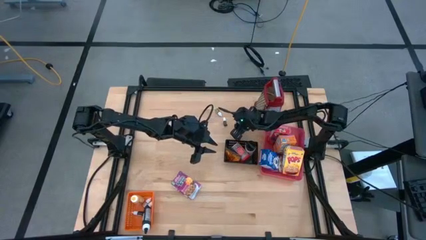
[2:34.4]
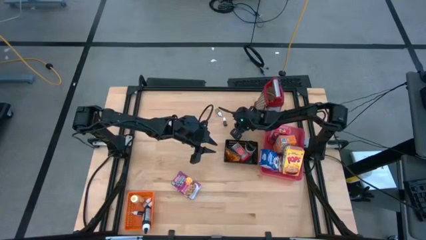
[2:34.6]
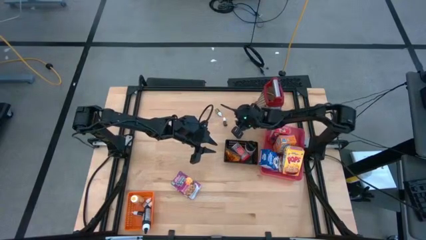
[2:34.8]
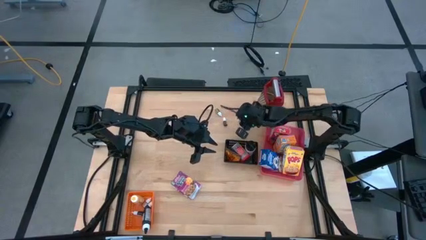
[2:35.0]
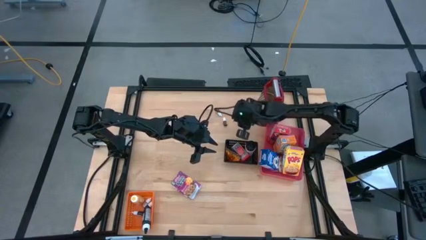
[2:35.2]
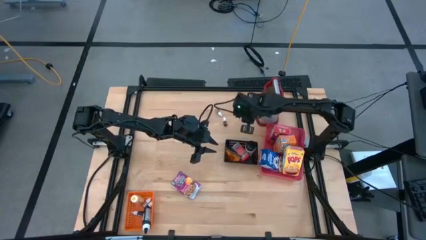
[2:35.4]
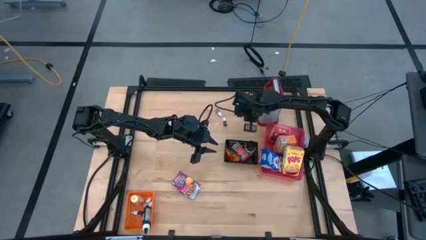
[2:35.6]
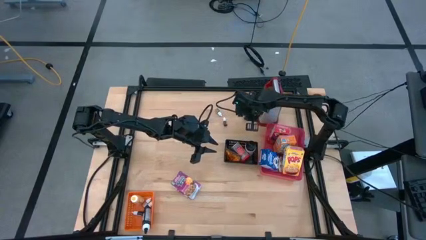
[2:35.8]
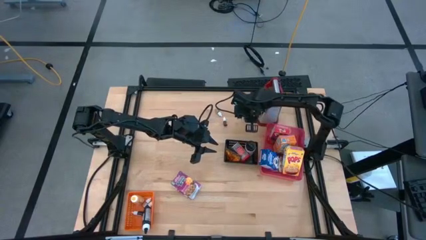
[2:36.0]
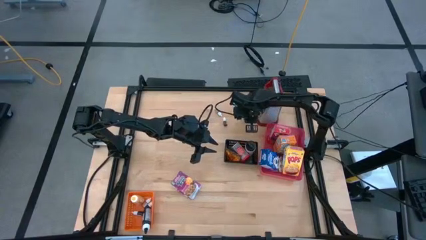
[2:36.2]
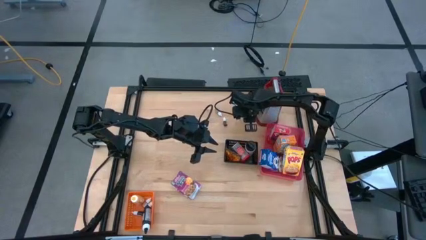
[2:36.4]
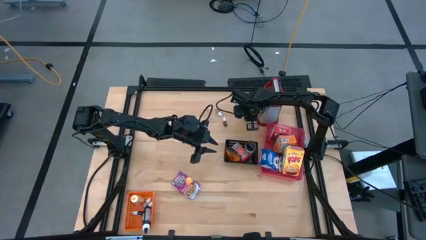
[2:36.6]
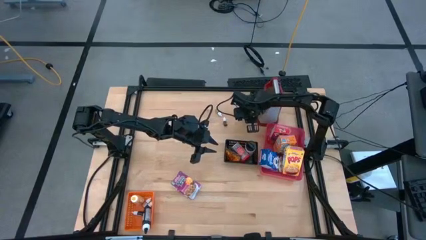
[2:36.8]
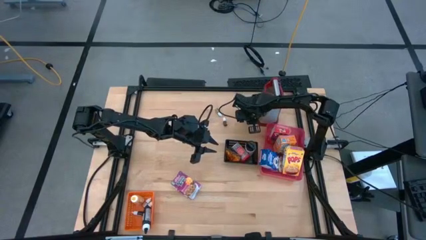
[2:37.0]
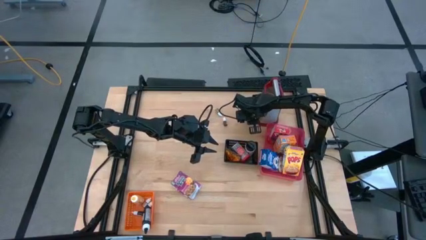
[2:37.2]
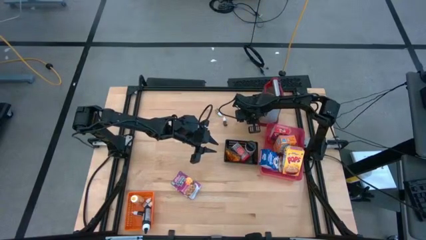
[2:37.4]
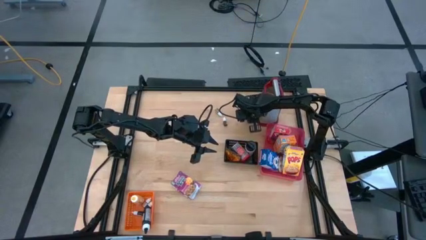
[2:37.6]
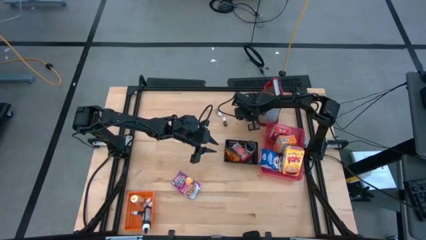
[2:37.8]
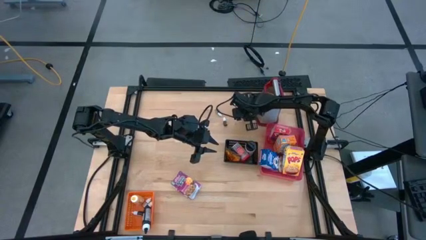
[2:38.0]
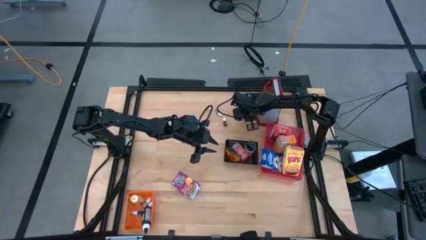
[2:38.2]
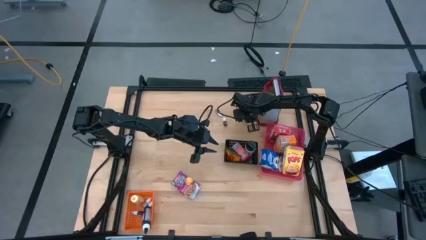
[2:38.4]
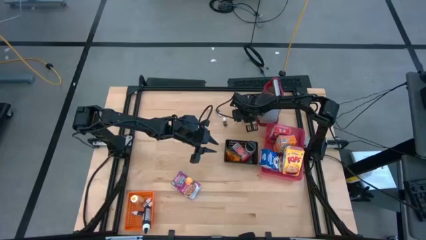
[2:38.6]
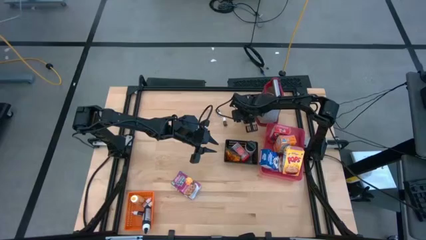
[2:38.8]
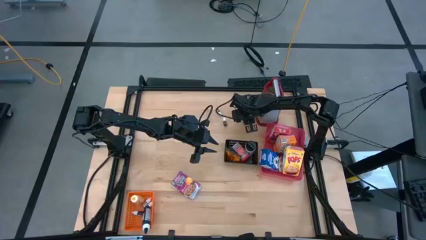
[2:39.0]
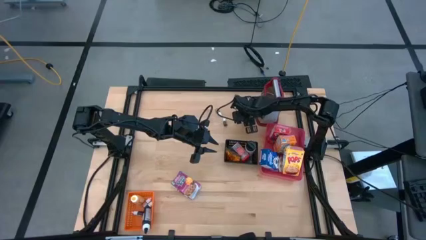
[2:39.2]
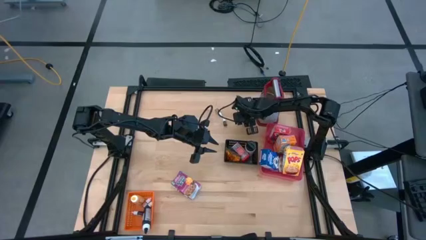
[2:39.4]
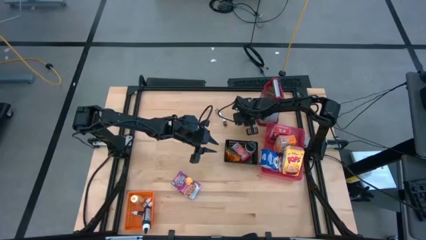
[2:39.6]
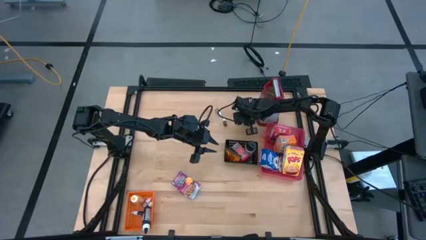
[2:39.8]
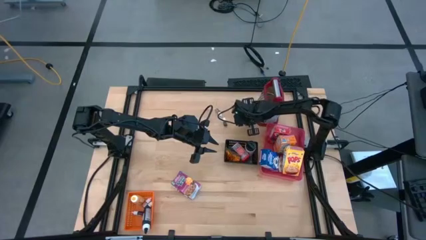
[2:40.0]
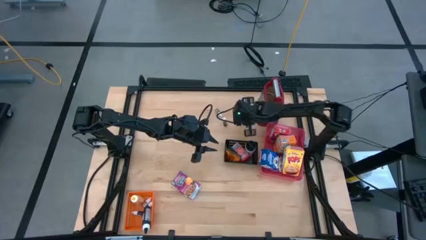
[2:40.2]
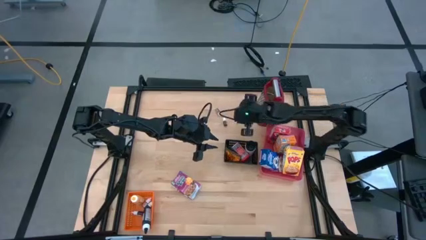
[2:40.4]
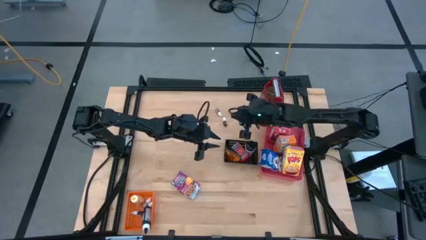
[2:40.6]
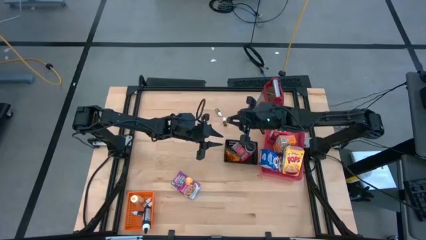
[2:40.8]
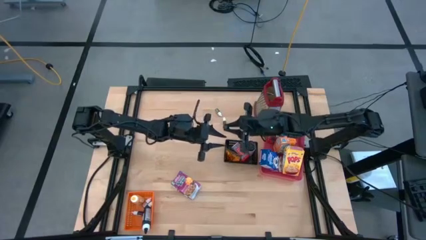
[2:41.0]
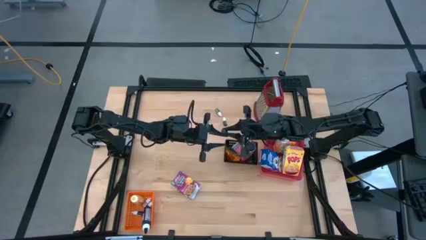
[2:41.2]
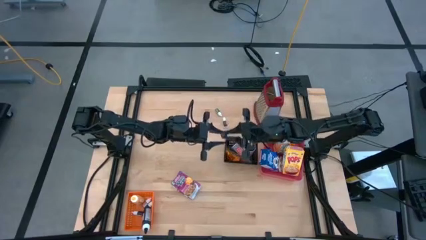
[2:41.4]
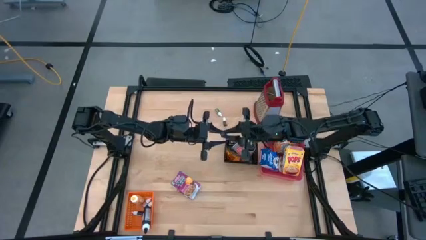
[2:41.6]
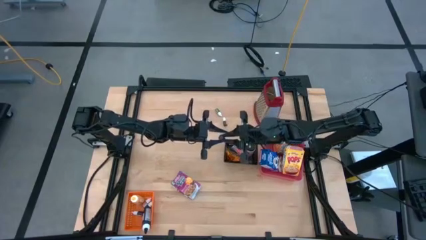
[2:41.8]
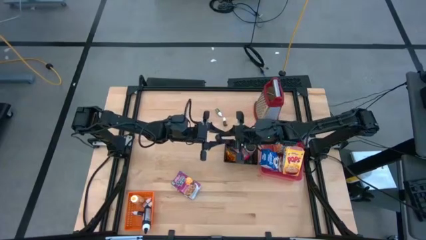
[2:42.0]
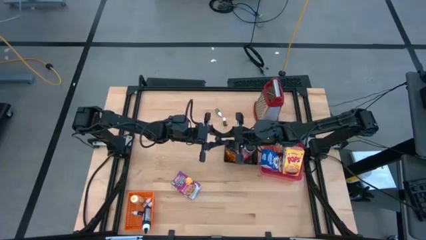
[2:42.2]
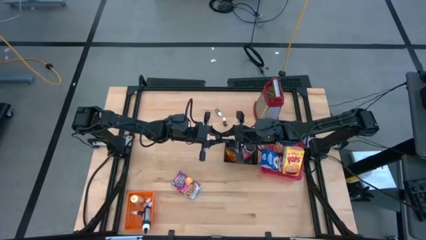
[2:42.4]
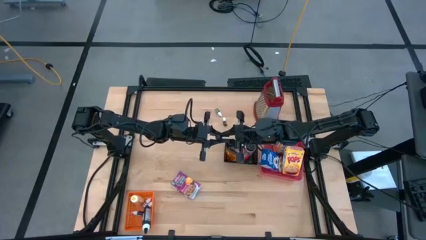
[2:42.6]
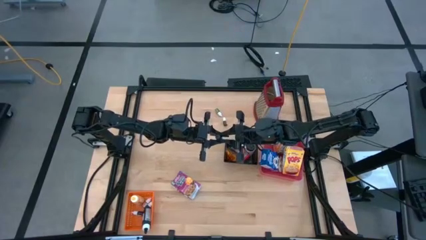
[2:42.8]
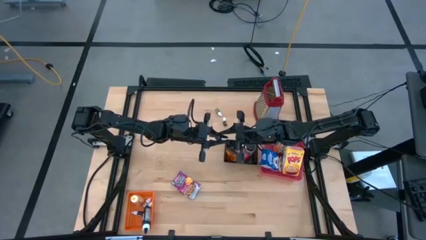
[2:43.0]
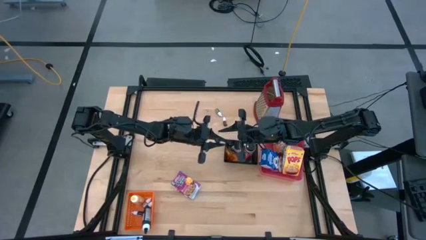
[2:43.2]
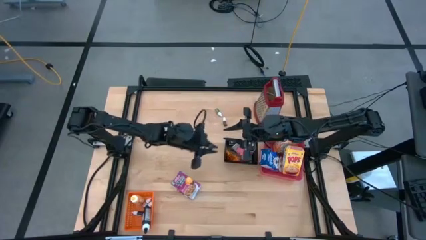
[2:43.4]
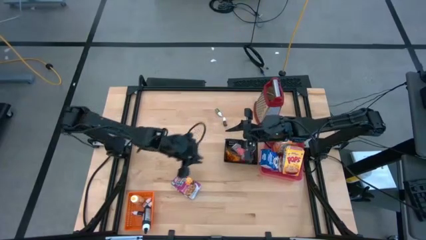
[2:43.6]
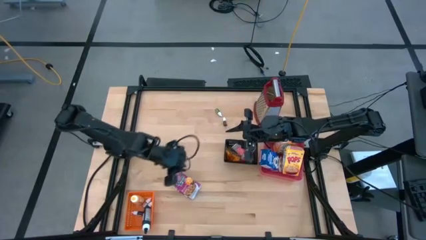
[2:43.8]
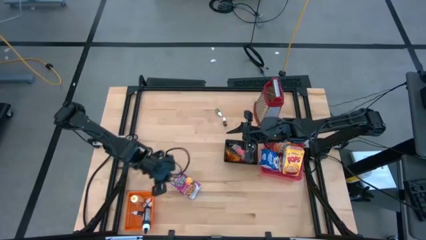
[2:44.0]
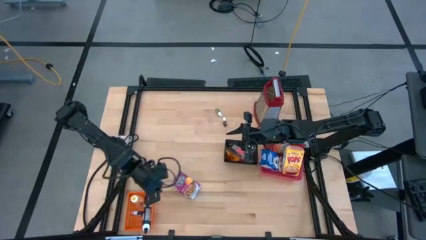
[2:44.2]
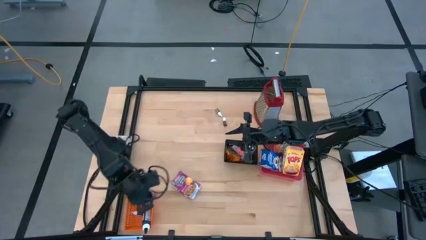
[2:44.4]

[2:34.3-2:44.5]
Task: Pick & Place Kitchen Items
Put the small purple food coloring bottle into the orange bin

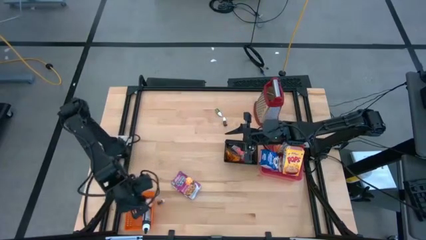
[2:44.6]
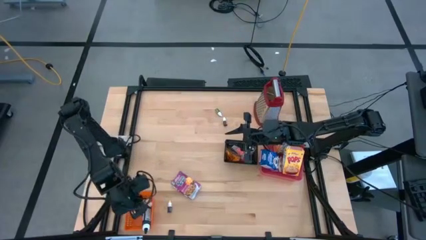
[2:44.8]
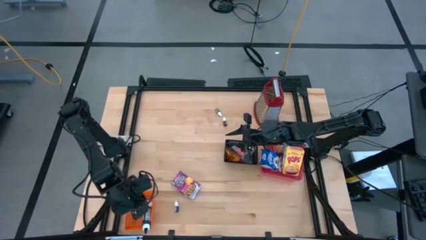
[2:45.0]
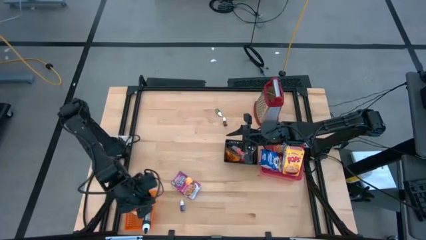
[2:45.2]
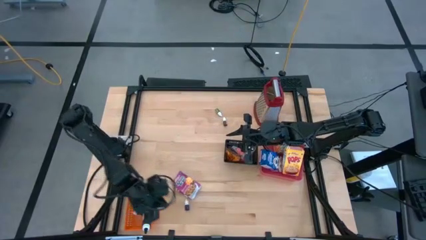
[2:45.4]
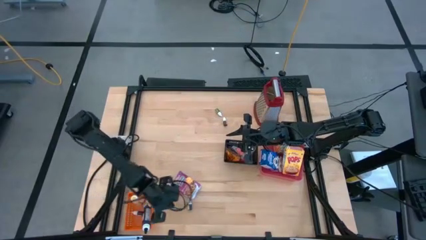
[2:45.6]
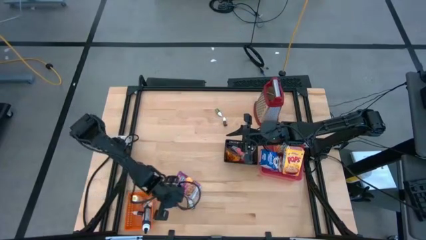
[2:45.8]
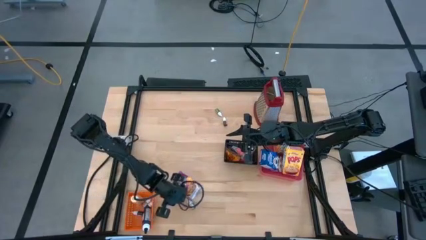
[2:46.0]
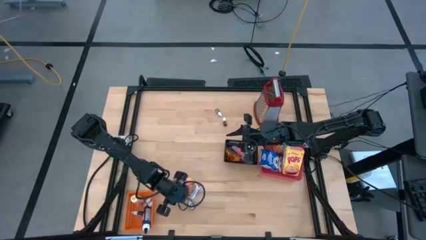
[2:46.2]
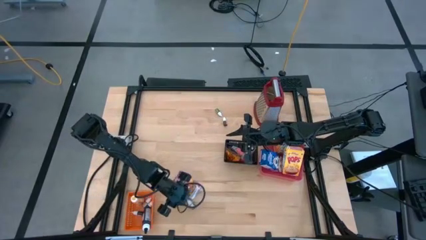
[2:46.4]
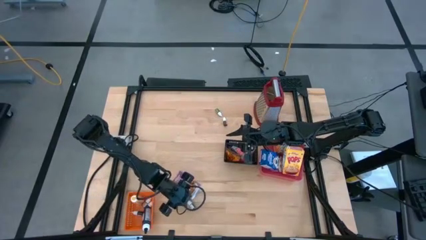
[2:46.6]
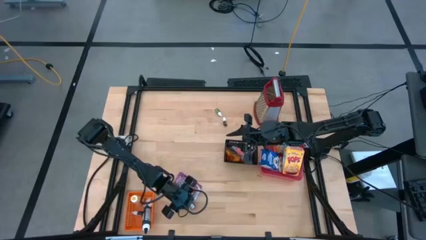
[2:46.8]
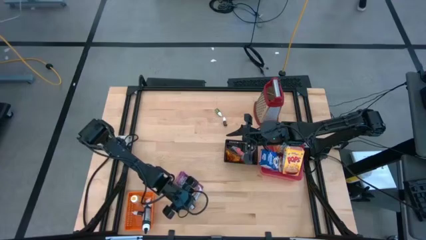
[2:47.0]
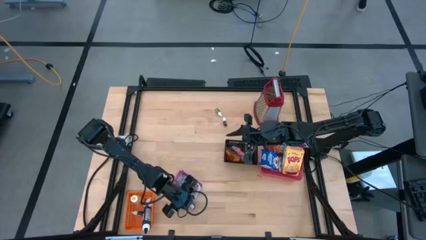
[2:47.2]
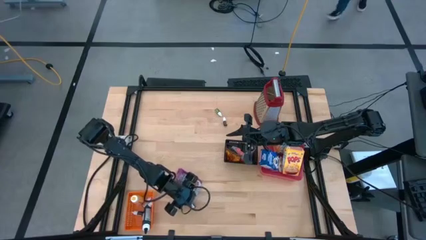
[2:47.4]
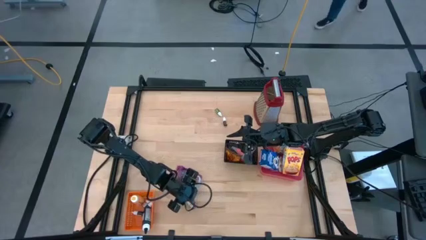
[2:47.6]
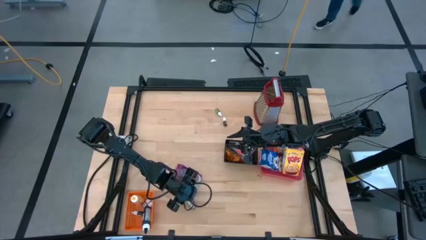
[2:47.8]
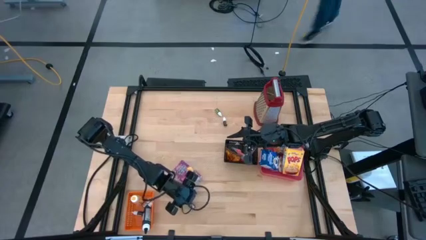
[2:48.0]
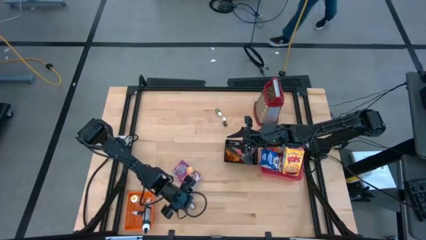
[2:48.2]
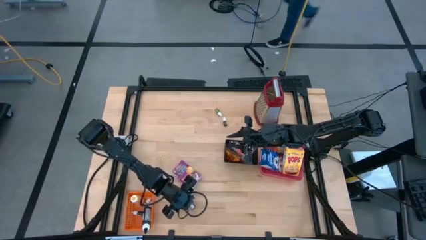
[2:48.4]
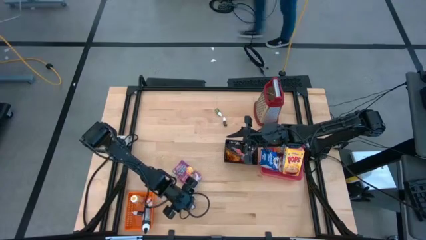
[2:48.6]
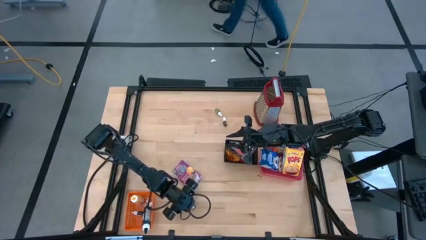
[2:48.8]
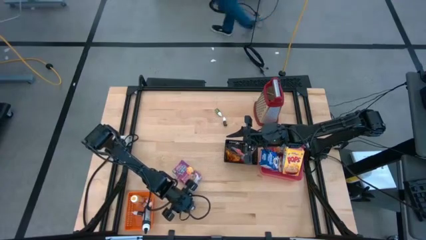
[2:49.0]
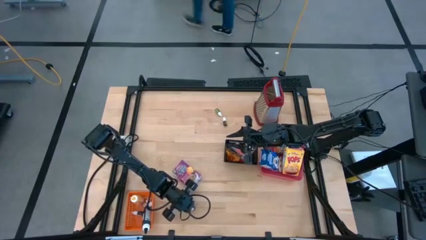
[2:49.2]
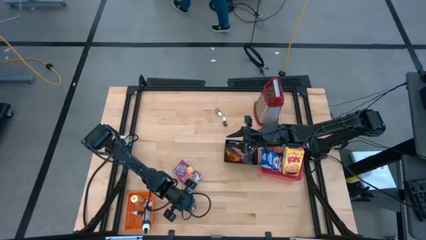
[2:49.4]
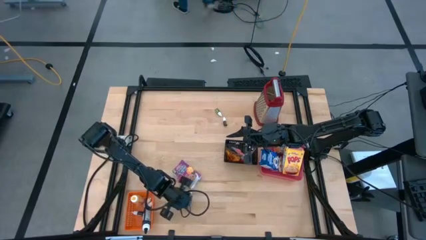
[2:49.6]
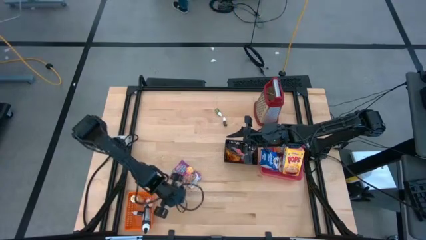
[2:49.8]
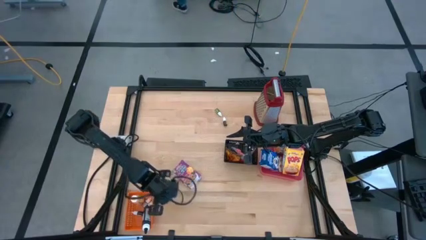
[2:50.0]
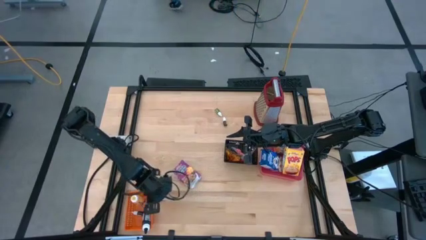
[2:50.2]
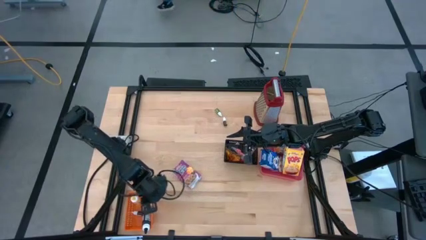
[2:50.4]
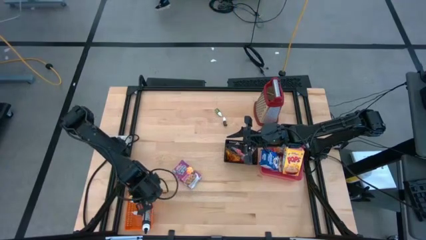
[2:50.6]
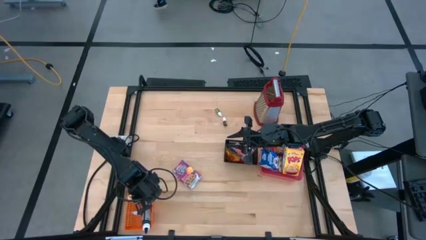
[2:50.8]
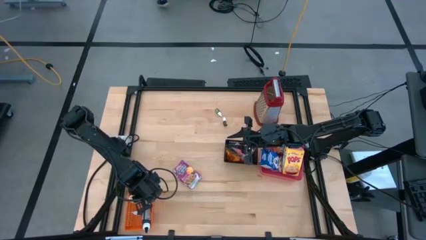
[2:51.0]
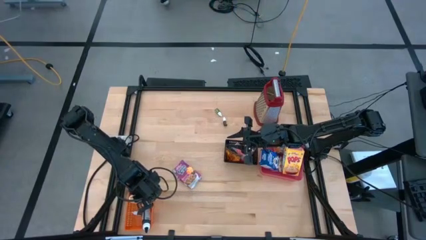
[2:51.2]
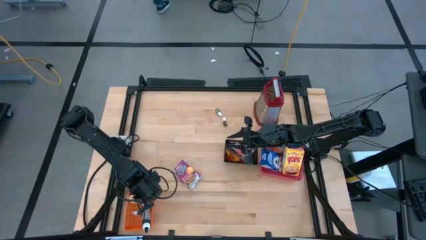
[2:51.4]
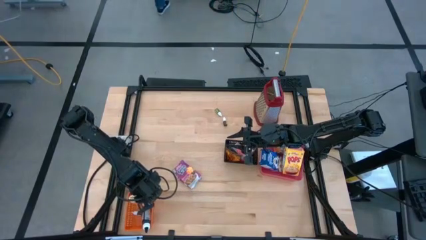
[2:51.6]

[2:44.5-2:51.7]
Put the small purple food coloring bottle into the orange bin
